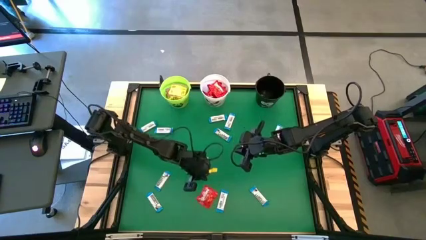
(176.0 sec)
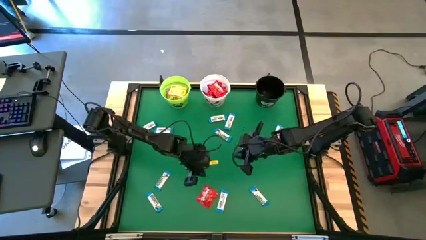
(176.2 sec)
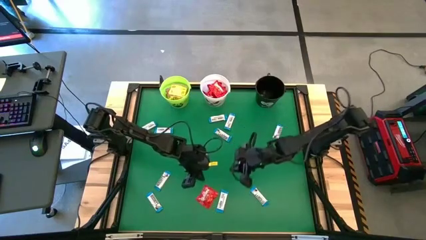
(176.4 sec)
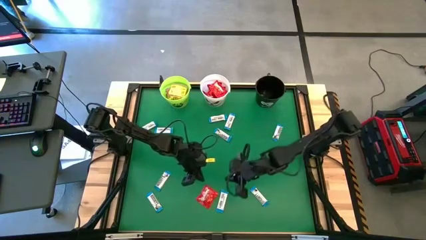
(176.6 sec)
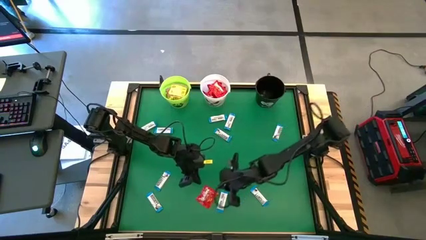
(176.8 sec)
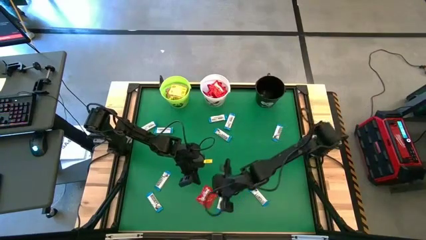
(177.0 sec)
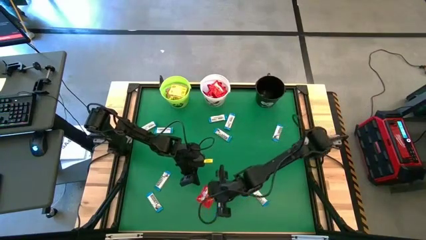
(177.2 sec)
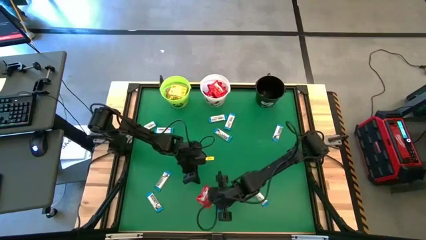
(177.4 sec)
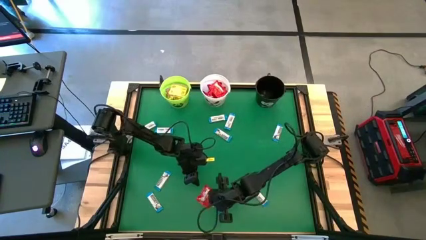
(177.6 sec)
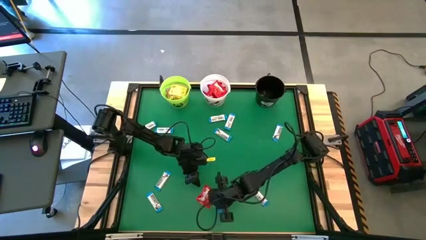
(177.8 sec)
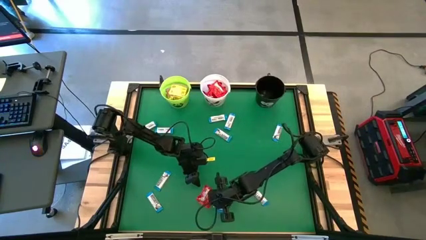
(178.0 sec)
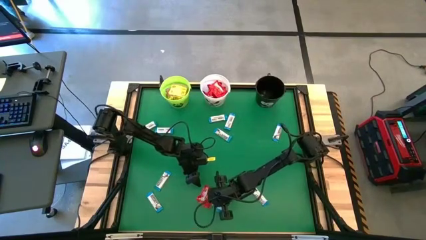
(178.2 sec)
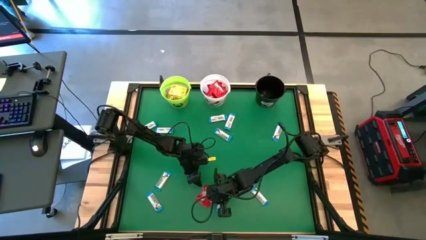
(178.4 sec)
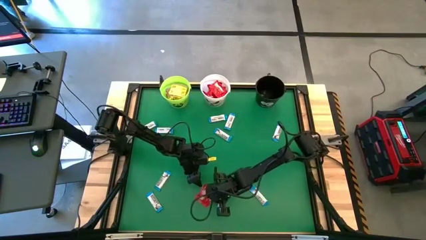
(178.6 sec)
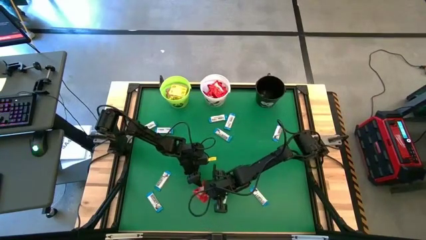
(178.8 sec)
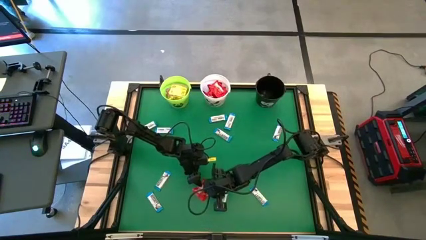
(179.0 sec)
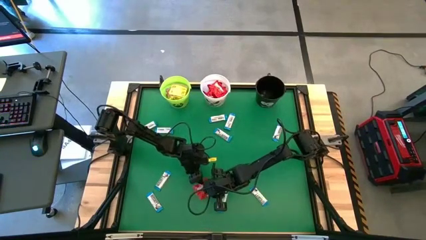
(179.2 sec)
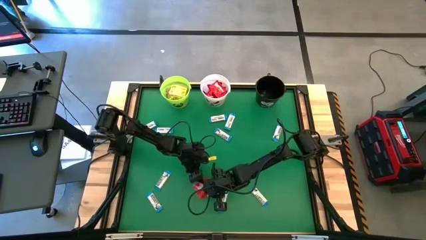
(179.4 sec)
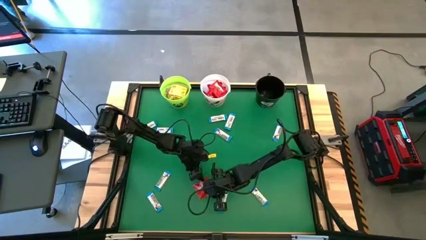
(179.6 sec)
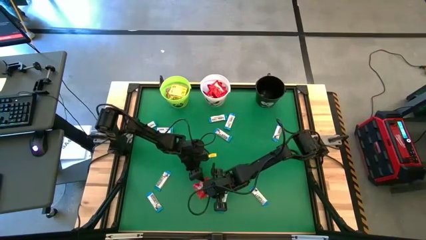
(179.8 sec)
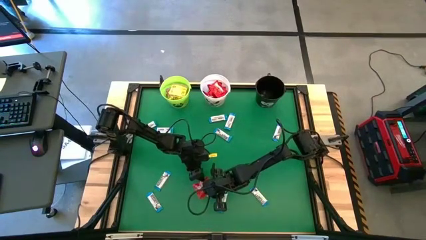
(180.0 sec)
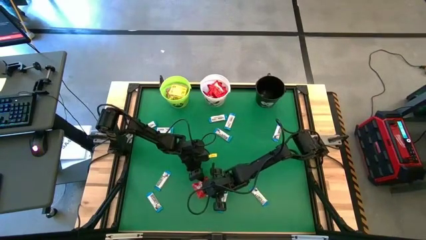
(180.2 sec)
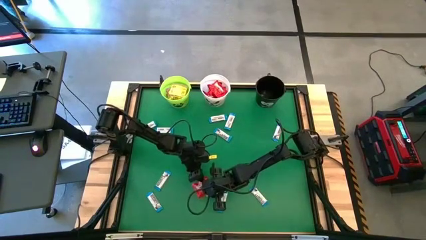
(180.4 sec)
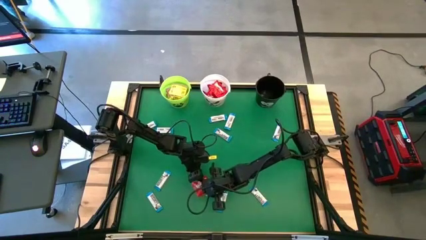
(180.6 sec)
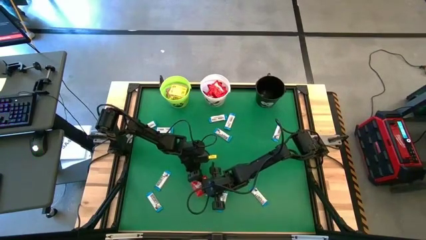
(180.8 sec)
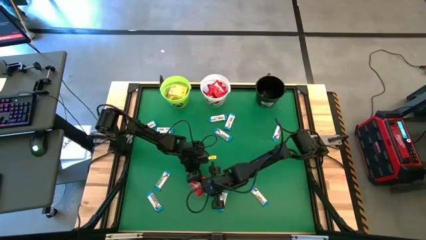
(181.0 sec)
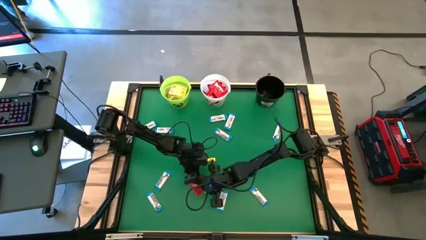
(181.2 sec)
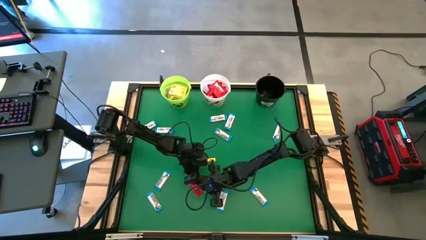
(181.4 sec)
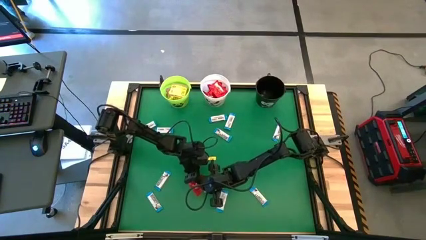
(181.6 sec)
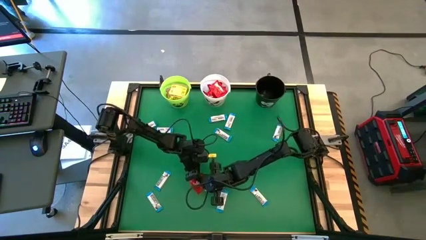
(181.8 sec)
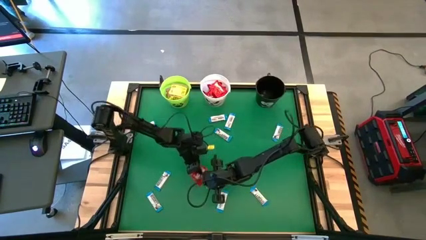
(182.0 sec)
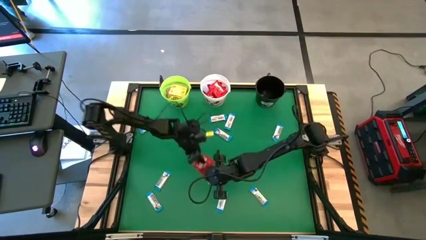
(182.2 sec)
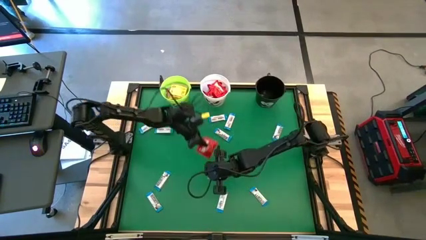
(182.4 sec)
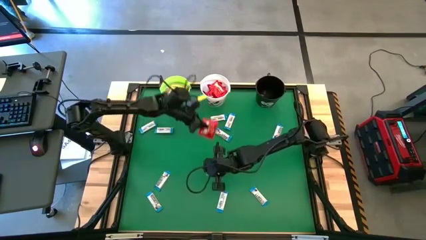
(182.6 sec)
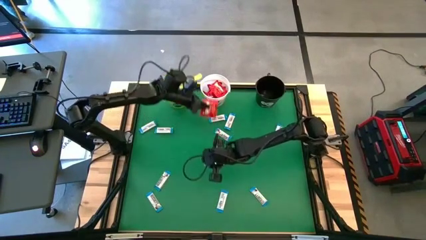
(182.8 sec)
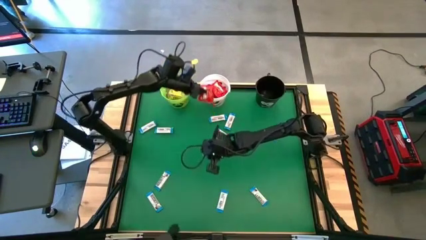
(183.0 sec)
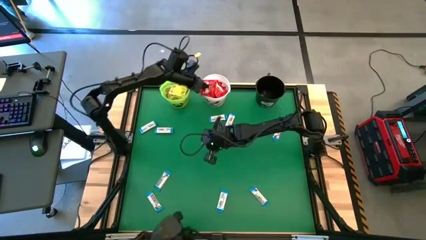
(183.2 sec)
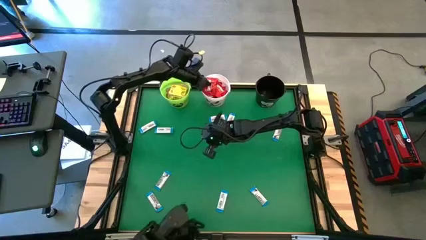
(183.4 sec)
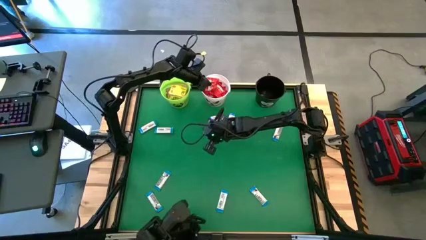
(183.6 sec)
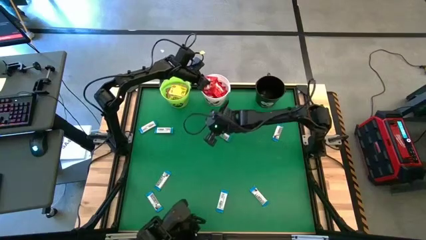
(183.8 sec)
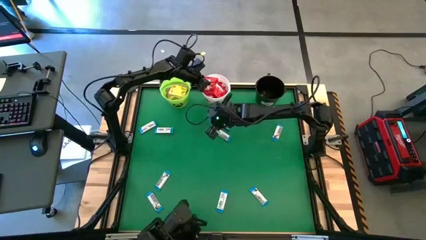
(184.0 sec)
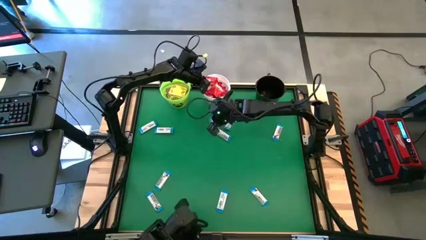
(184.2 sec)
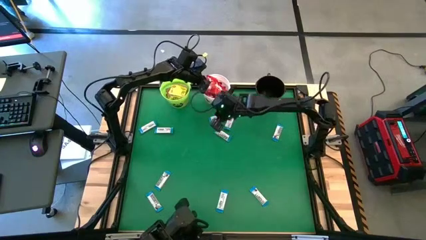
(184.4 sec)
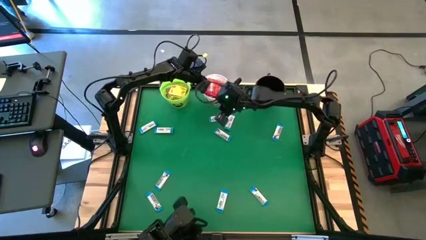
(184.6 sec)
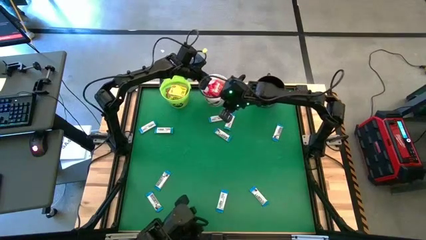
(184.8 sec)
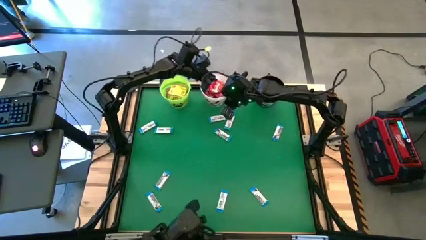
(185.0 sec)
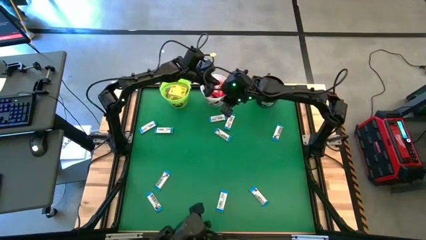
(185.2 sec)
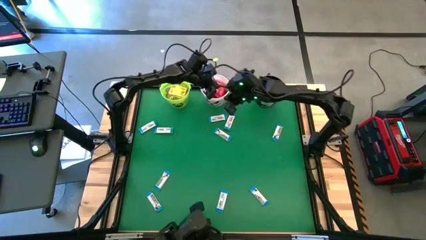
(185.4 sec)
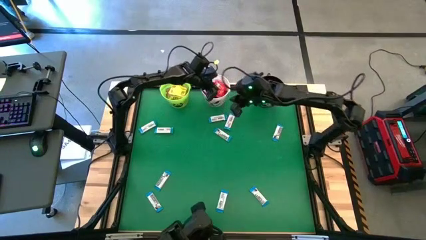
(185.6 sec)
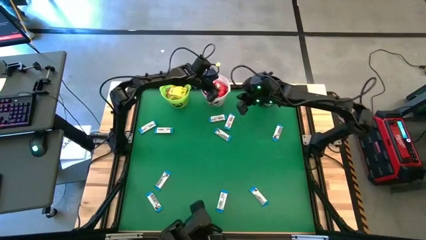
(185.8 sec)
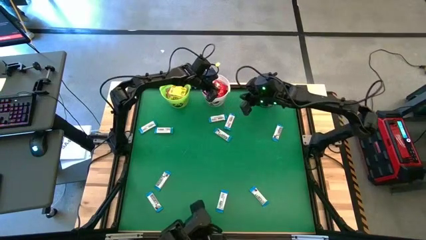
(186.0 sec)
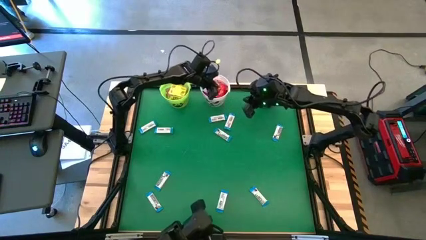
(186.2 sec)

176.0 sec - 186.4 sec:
Task: Sort candy by brand, put in halloween buckets
Put the red candy into the white bucket

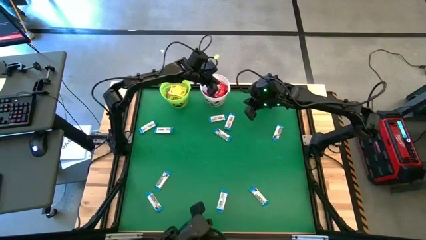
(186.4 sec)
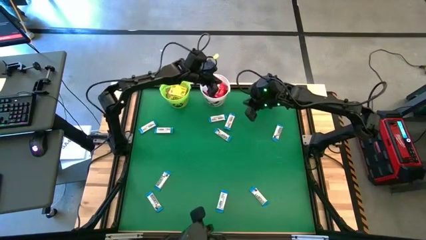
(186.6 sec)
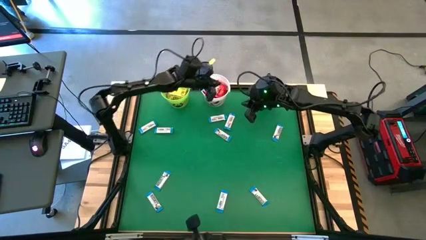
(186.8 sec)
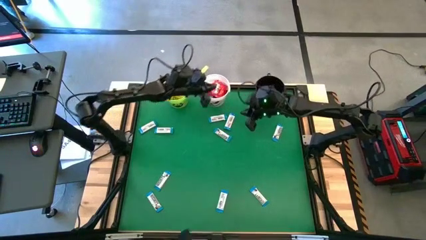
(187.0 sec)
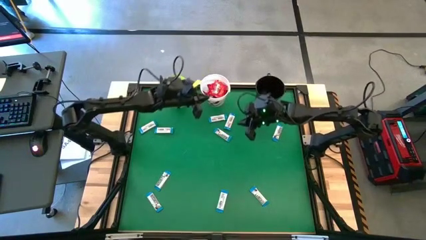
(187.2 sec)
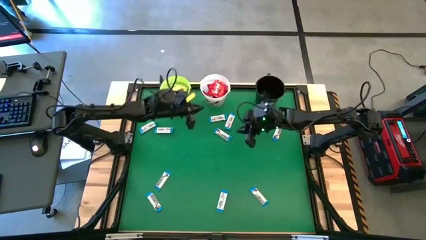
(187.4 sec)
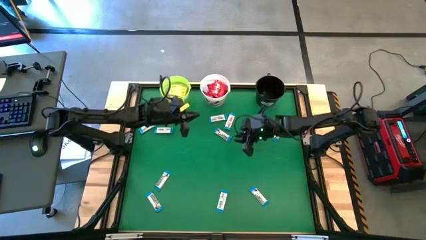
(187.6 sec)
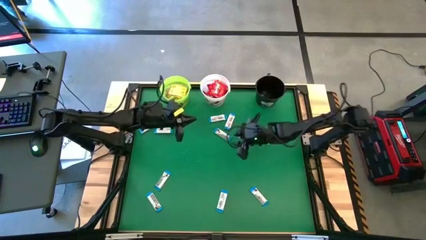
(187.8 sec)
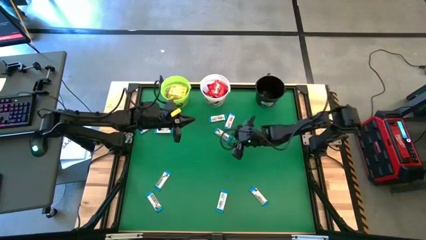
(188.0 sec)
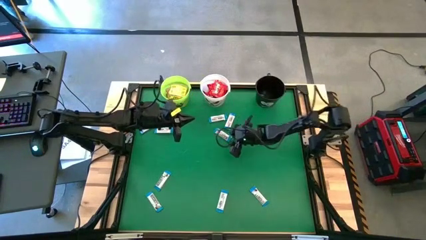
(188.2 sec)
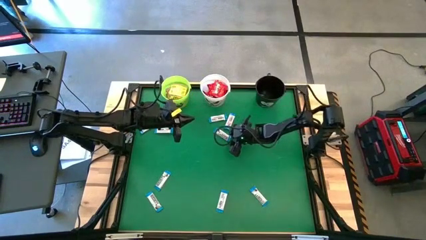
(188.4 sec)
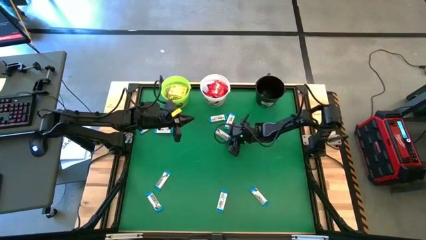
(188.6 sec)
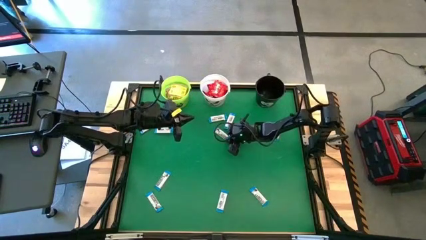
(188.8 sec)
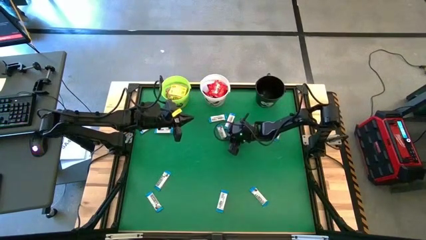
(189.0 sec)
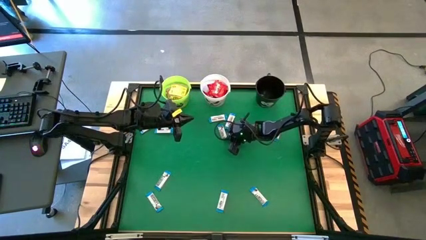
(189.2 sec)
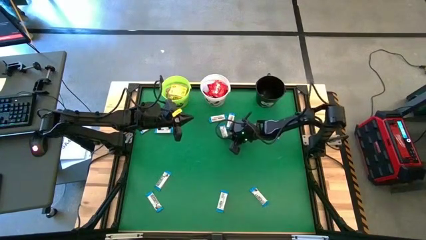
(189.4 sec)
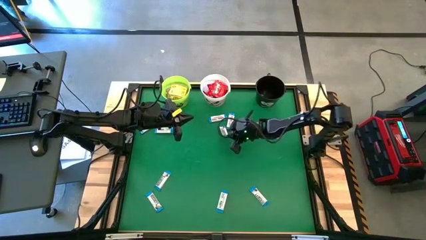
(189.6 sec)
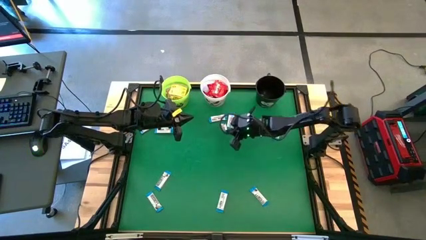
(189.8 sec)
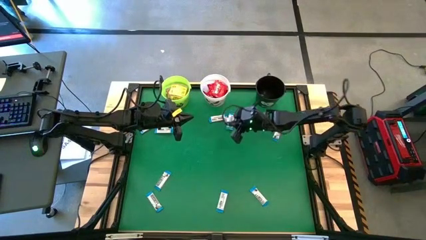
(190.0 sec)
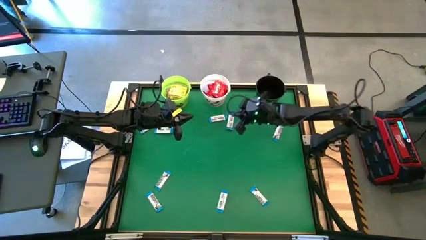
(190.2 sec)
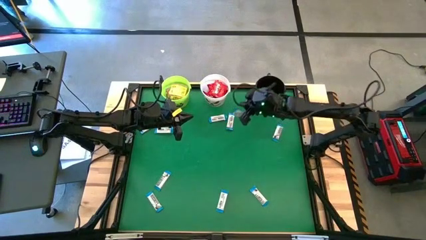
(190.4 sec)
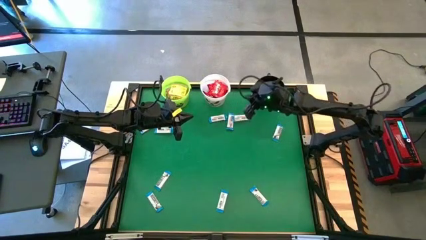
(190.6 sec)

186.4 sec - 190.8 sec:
Put the white chocolate bar into the black bucket
